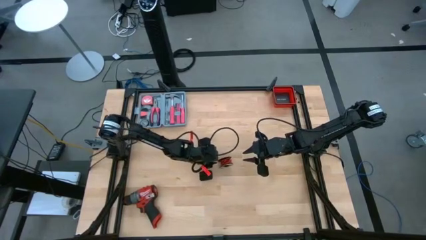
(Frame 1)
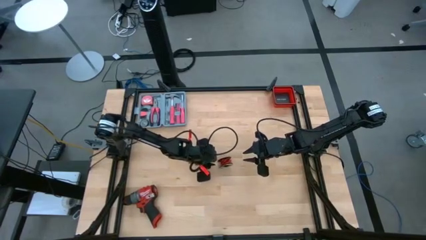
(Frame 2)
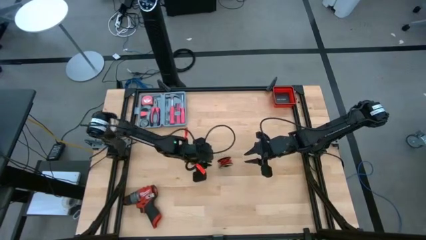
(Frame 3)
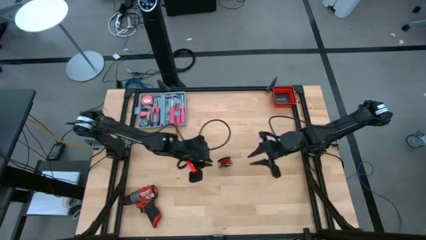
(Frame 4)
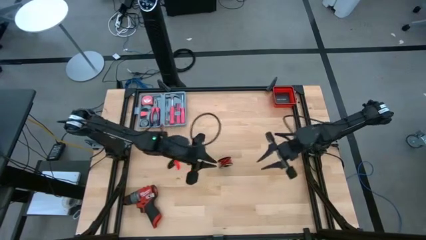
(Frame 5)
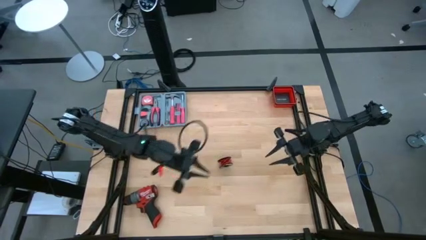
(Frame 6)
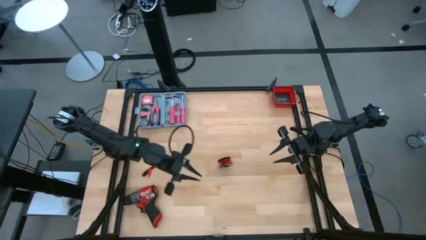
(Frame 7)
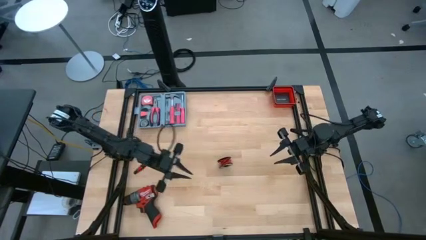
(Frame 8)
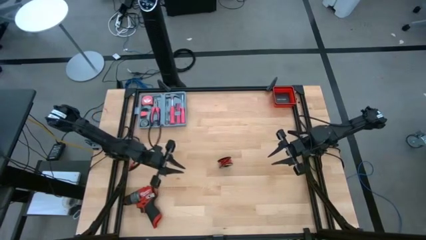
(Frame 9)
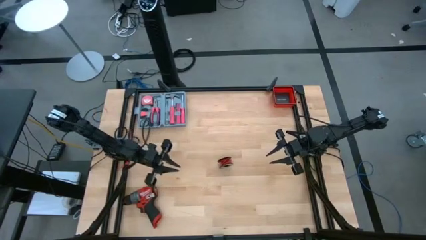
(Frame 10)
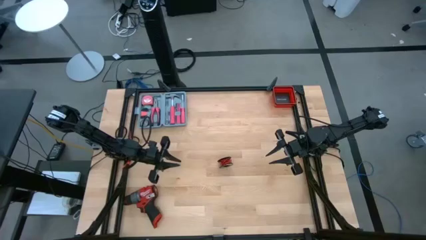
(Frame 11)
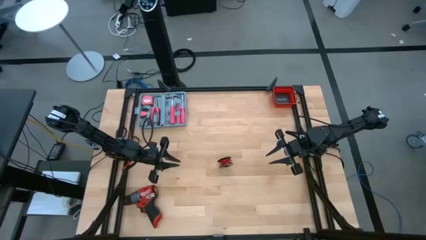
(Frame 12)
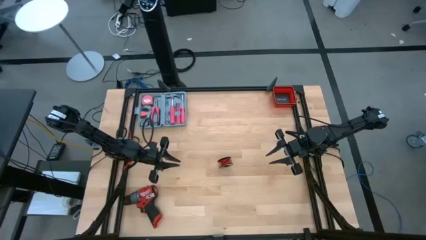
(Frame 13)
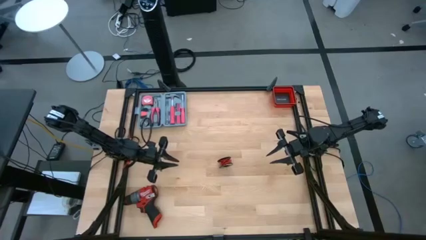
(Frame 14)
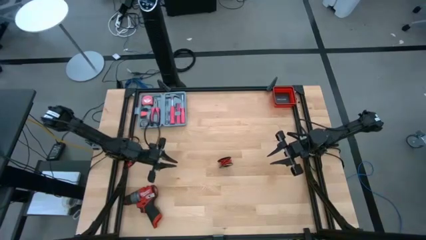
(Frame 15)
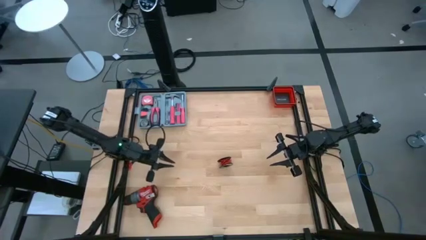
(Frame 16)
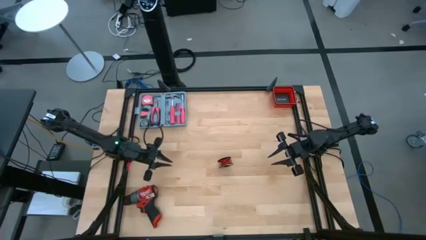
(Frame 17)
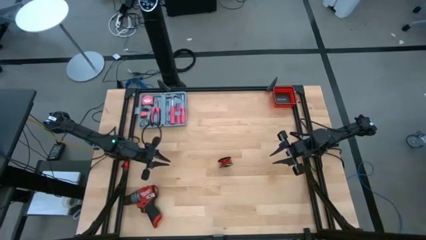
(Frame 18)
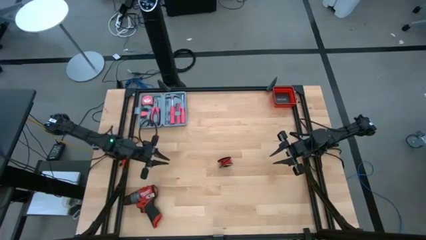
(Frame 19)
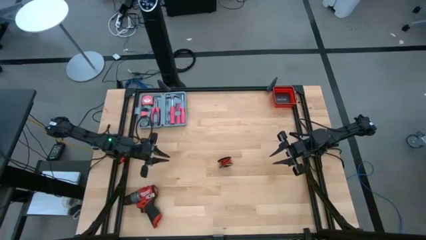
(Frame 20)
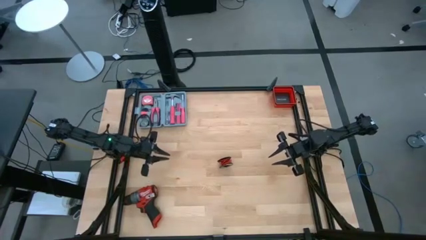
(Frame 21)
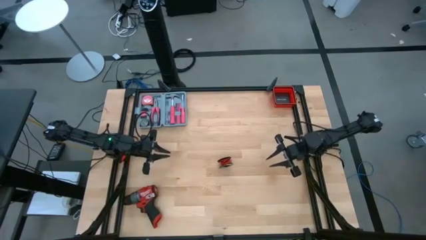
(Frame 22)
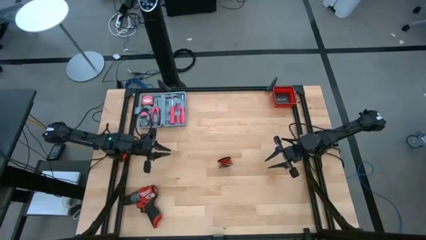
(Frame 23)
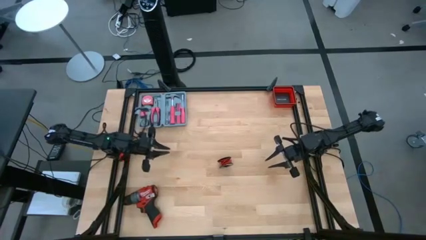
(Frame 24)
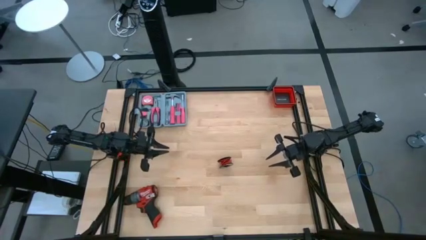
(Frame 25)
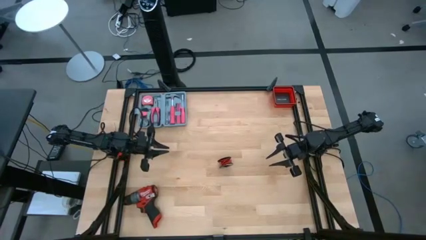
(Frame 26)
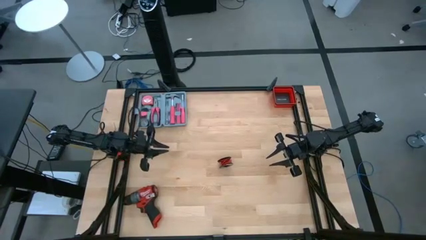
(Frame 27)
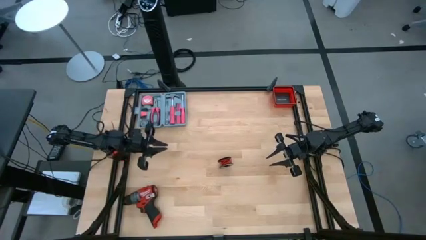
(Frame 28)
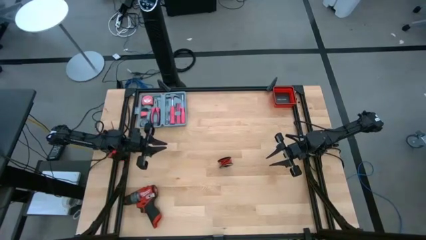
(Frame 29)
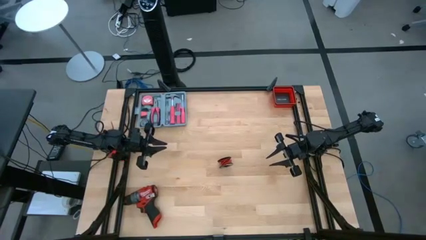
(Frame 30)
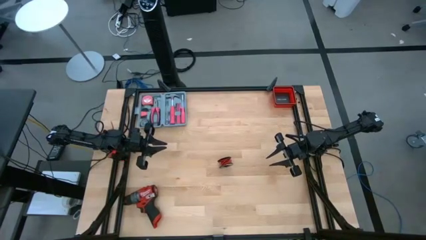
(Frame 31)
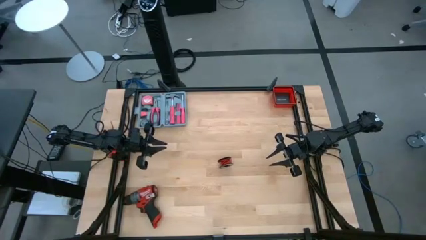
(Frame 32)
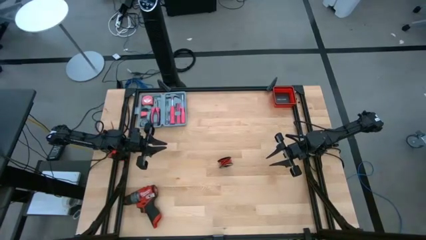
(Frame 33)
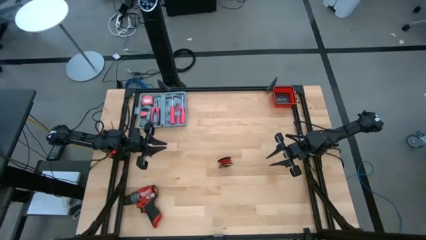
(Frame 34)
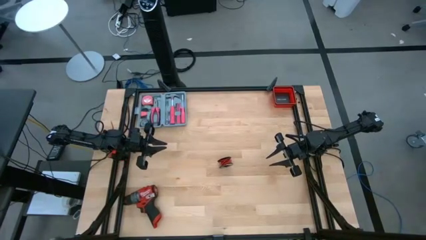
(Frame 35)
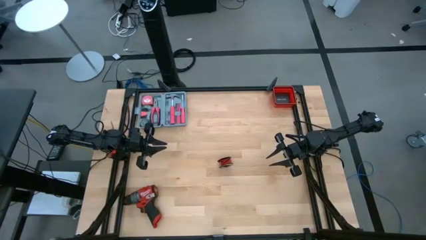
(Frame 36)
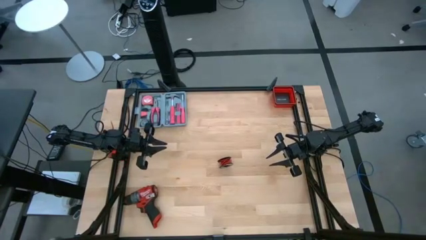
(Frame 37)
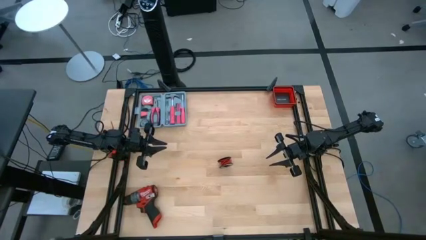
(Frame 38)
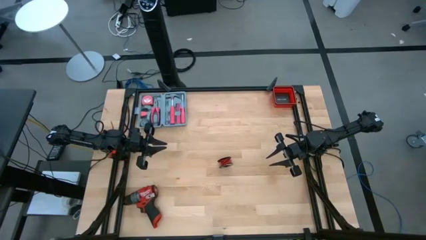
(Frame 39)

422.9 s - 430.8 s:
Task: Coil cords
Return to Home Position

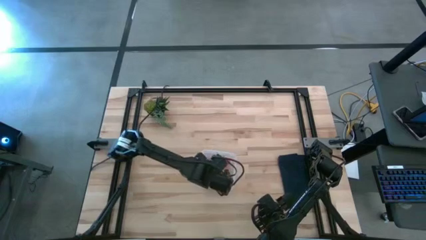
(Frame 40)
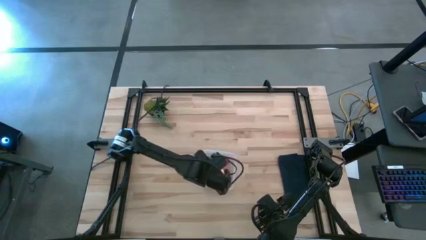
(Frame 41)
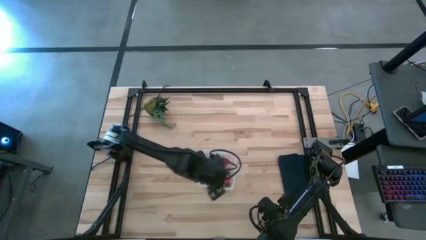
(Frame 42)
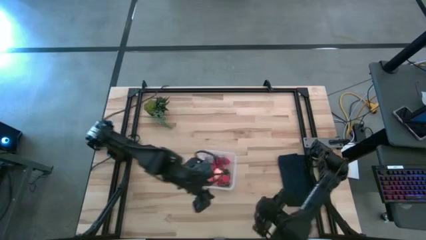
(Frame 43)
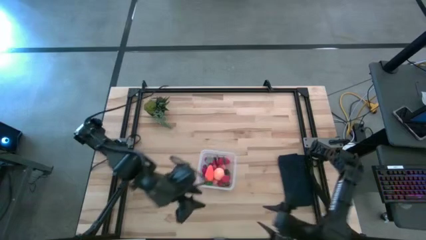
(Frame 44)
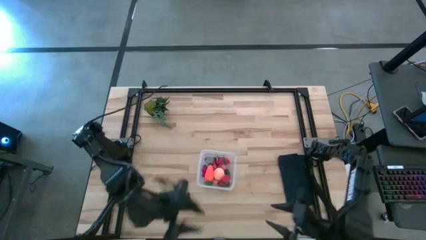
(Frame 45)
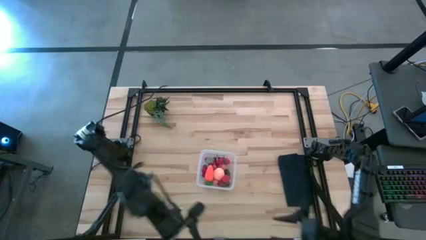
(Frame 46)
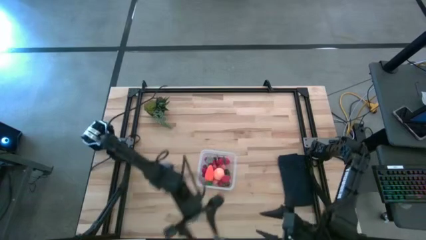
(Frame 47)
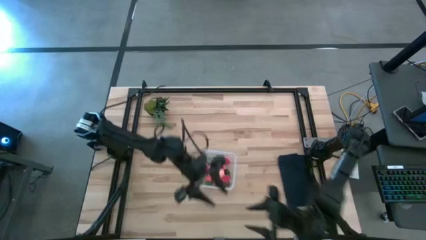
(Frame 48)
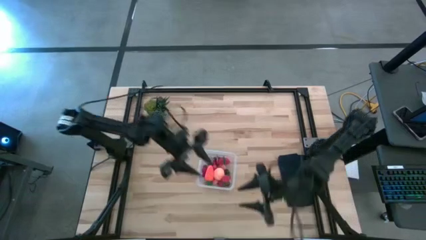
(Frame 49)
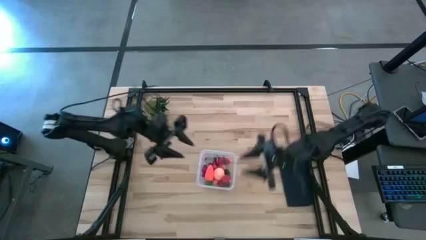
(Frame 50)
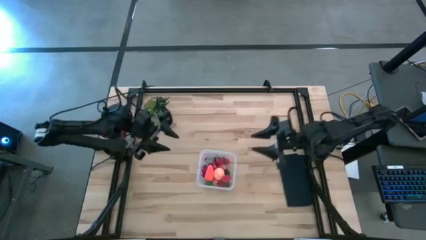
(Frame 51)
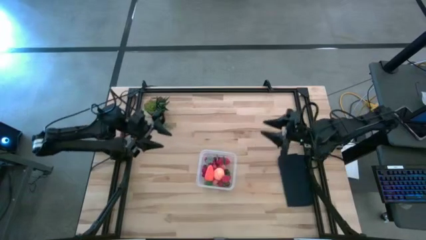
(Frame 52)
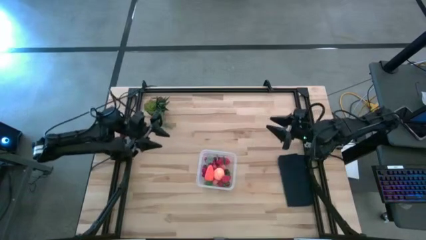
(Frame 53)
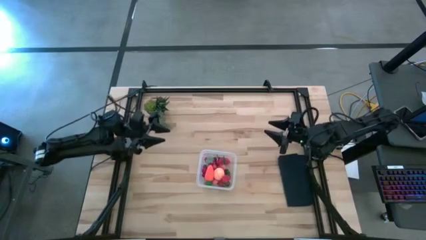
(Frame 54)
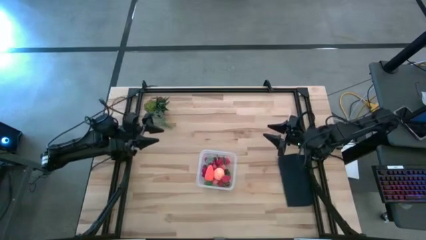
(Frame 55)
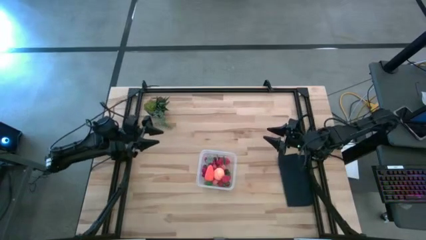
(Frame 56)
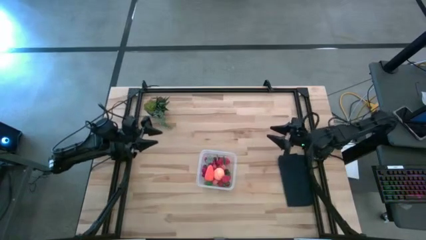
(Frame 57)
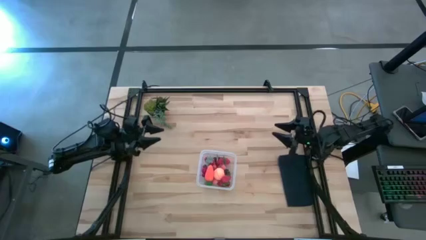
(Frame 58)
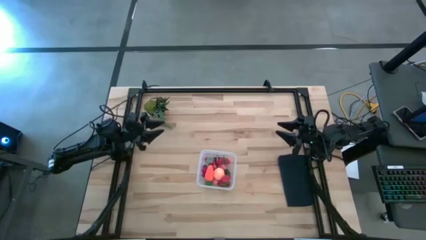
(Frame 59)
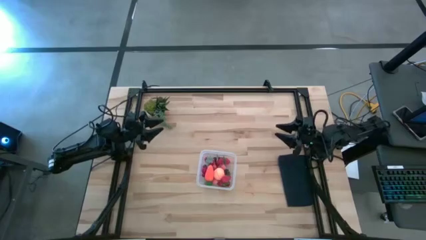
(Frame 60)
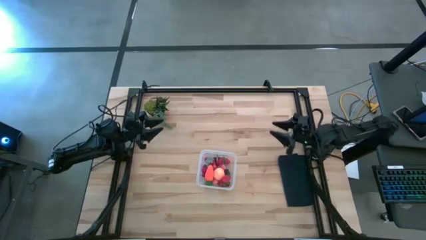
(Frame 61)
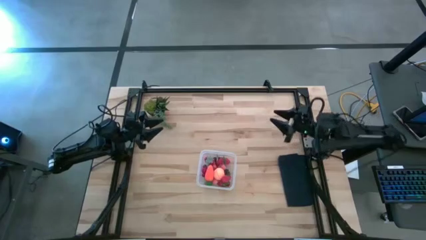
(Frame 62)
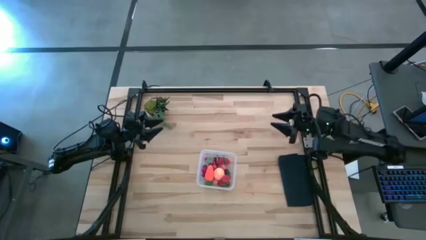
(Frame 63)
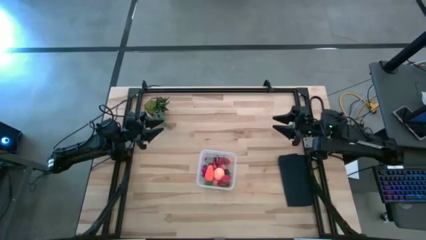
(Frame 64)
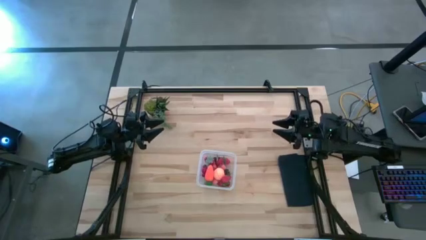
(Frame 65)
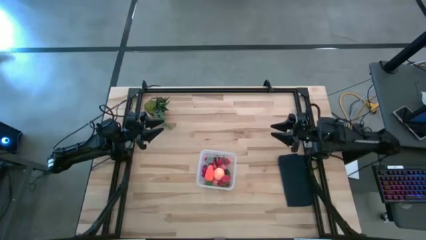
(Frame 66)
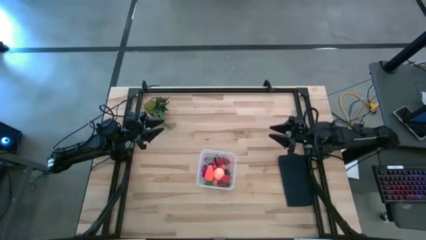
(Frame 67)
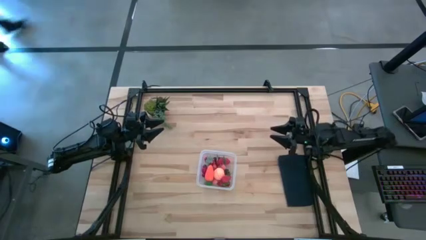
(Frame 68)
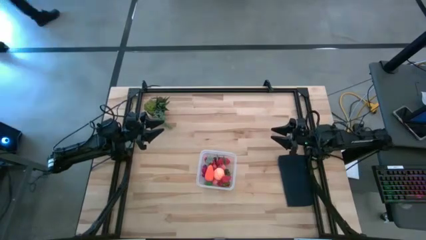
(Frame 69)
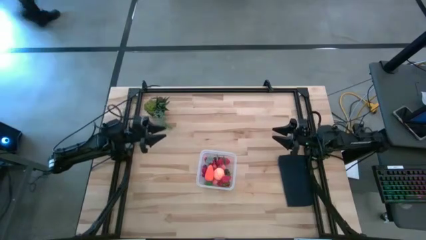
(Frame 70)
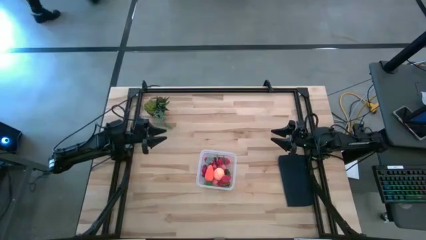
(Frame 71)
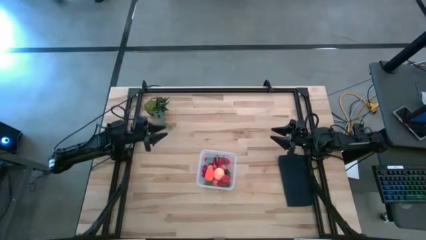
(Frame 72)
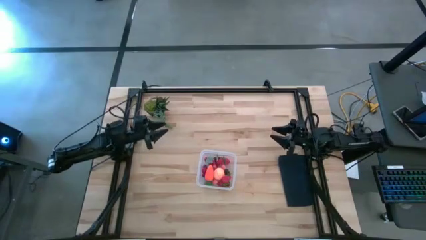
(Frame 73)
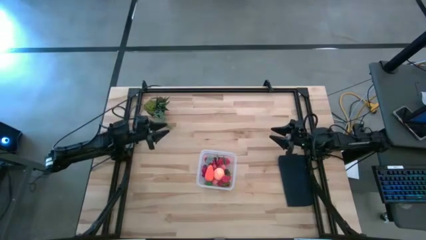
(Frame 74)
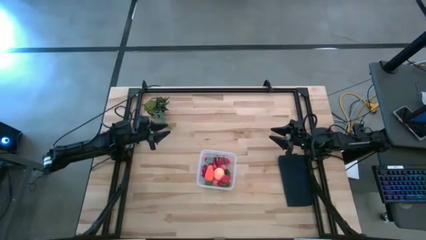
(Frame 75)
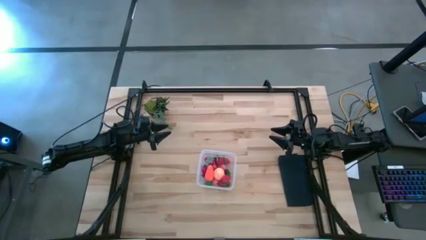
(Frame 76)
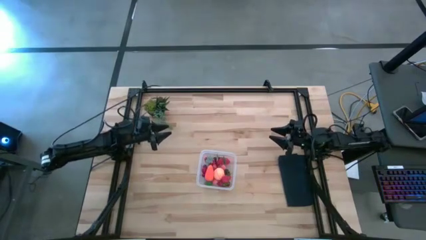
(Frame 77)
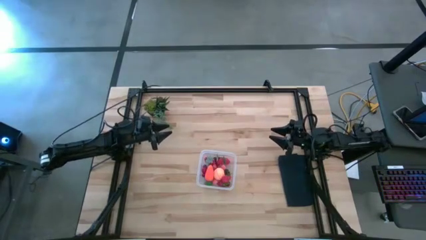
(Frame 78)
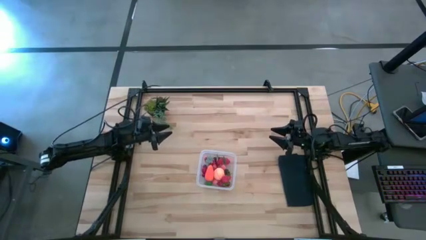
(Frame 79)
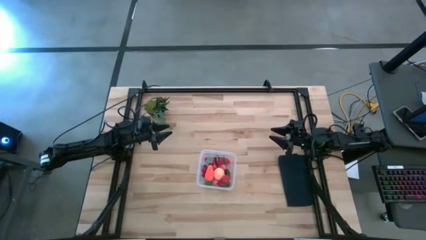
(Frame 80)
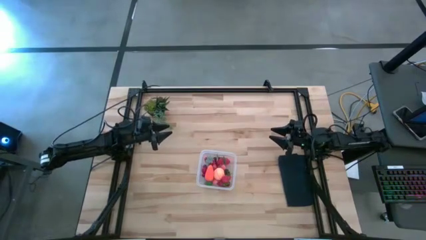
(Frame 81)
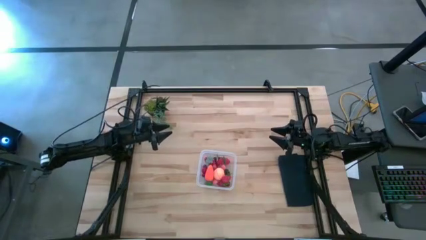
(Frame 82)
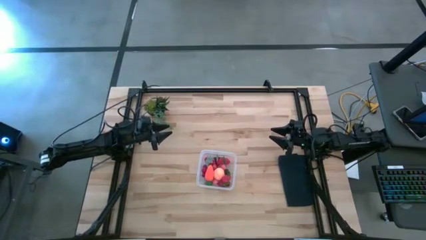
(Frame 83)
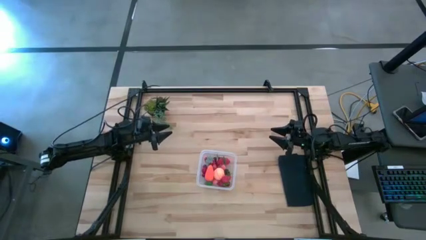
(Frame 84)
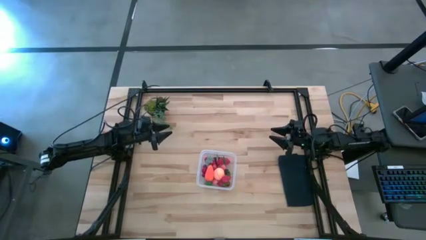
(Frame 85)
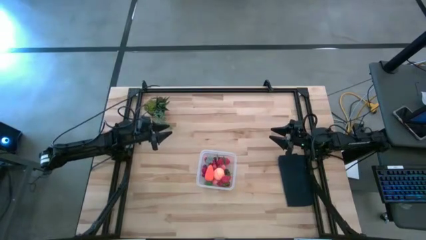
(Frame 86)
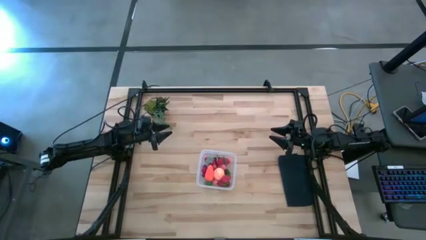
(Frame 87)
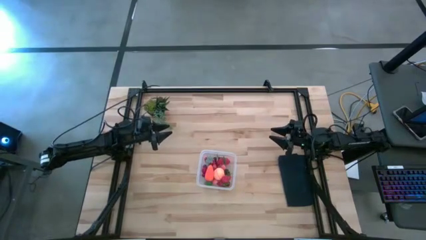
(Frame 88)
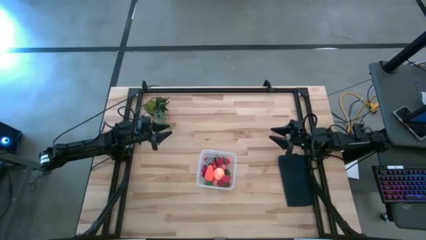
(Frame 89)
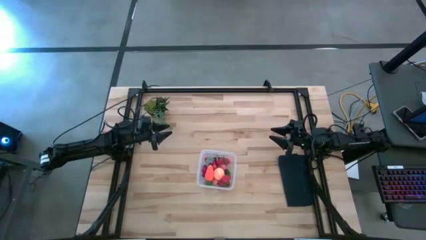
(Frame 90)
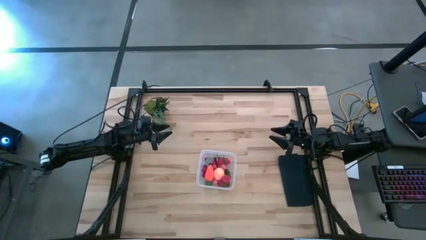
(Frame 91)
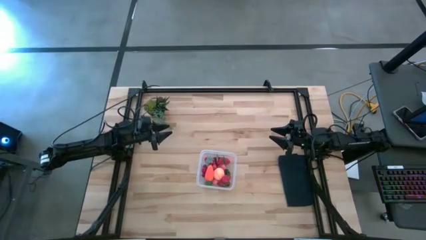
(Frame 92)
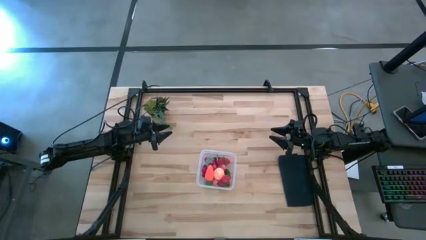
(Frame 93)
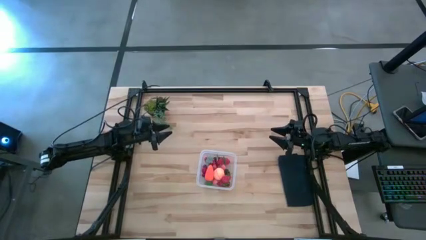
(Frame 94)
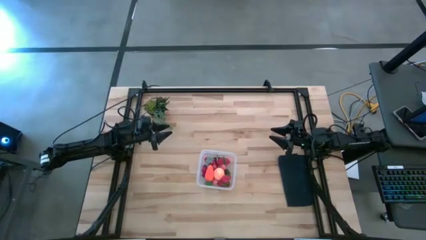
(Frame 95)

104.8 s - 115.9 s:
Task: Pick and placing Produce into tupperware
Return to Home Position
